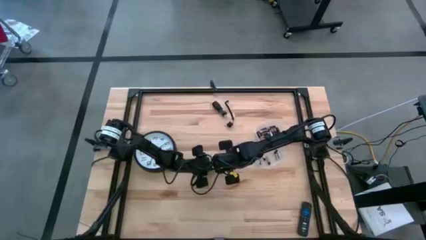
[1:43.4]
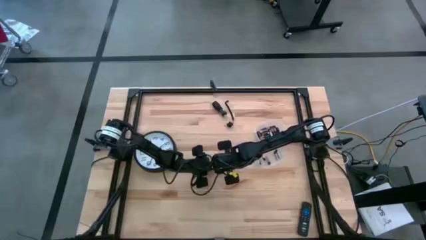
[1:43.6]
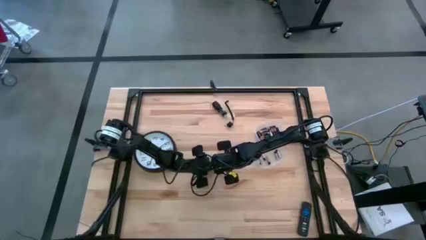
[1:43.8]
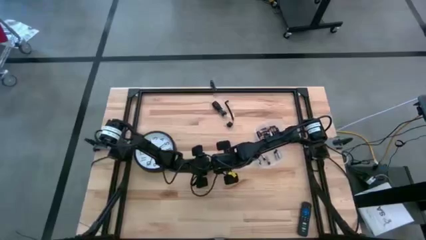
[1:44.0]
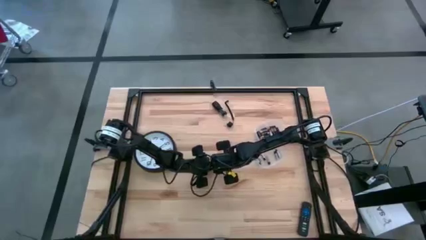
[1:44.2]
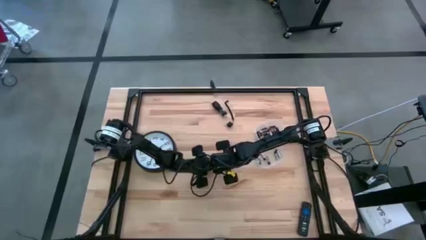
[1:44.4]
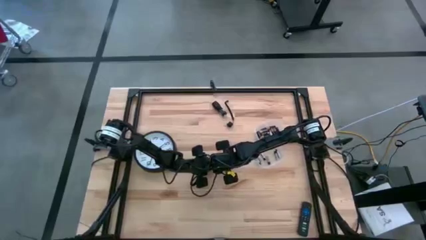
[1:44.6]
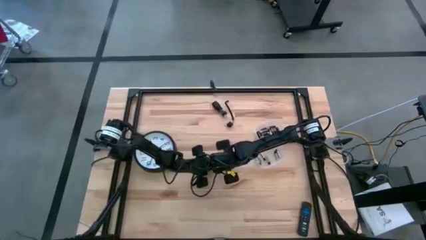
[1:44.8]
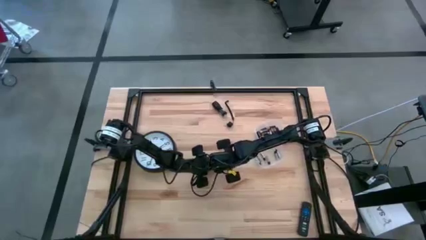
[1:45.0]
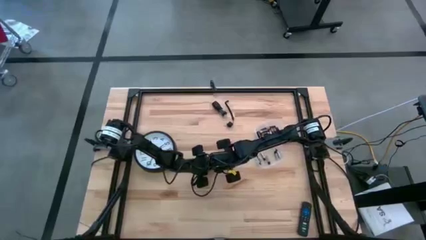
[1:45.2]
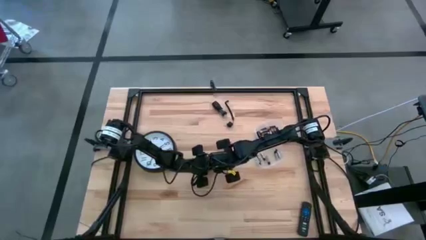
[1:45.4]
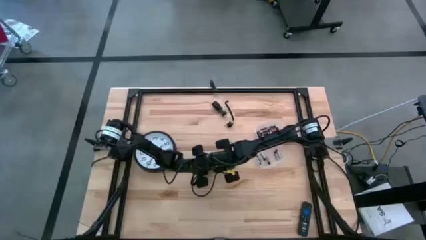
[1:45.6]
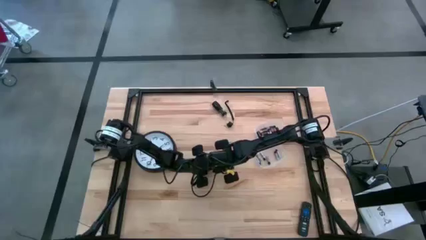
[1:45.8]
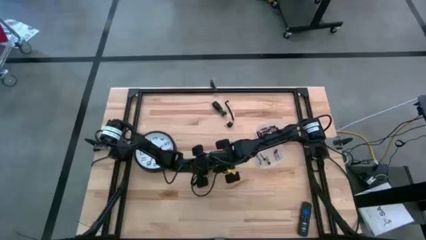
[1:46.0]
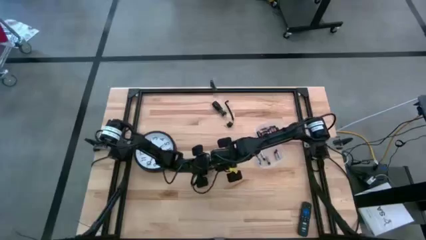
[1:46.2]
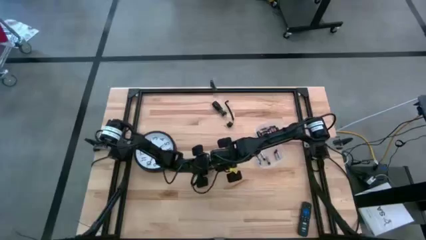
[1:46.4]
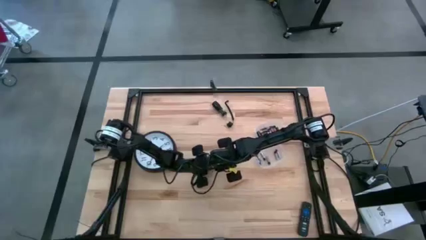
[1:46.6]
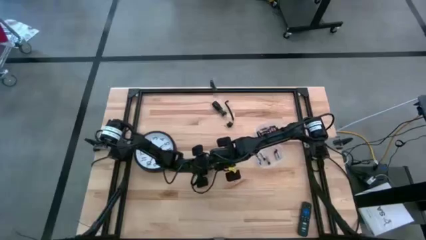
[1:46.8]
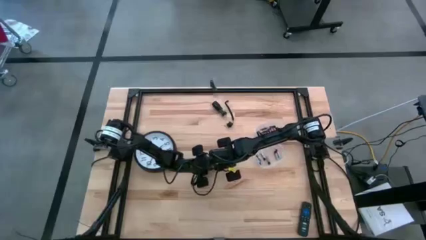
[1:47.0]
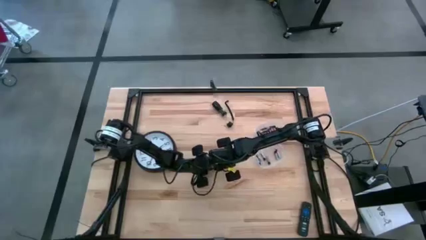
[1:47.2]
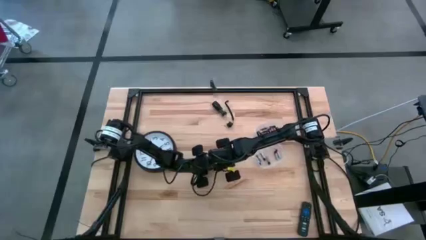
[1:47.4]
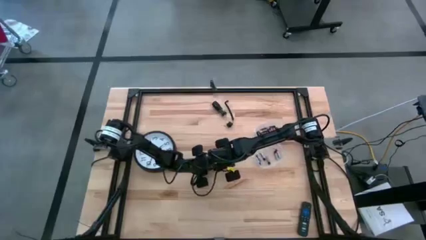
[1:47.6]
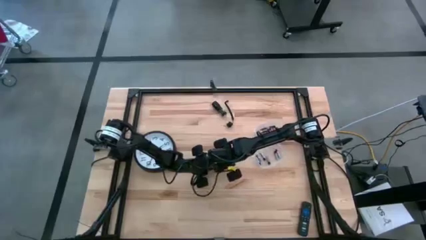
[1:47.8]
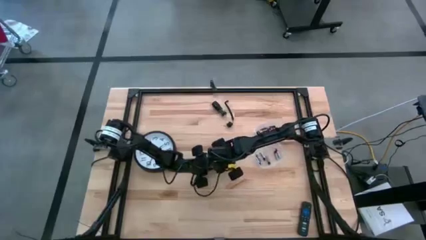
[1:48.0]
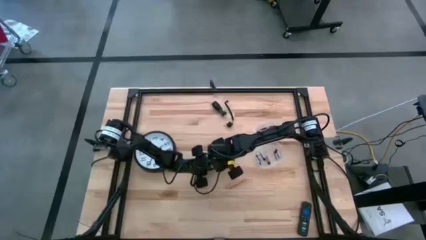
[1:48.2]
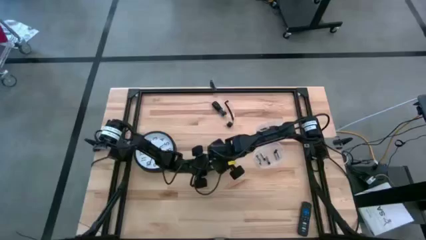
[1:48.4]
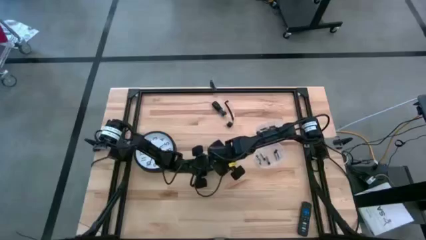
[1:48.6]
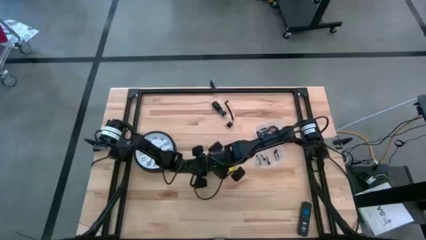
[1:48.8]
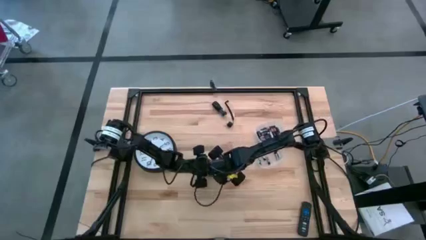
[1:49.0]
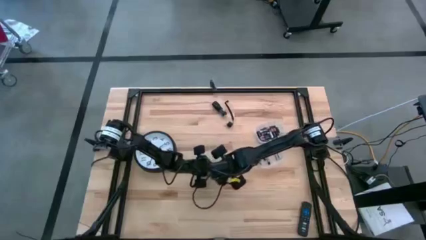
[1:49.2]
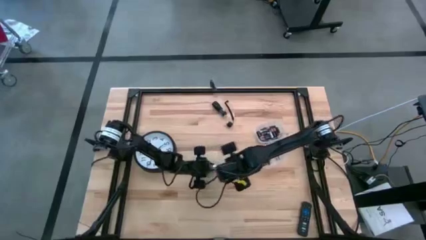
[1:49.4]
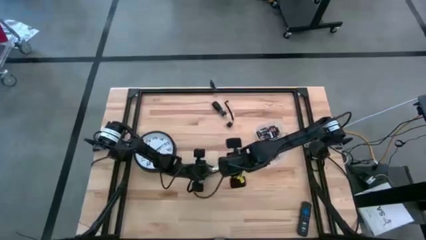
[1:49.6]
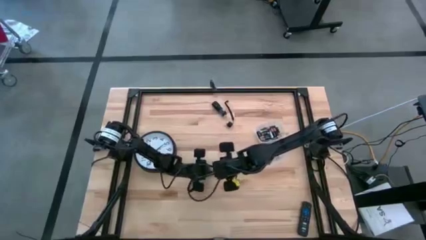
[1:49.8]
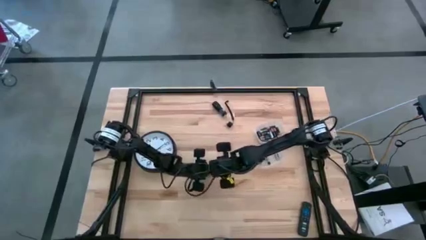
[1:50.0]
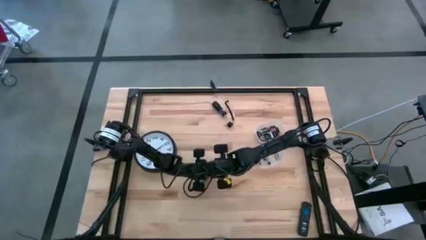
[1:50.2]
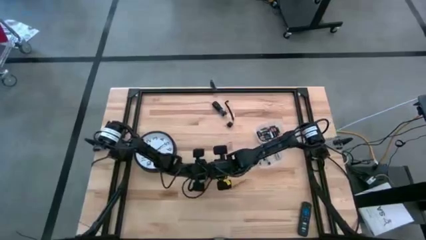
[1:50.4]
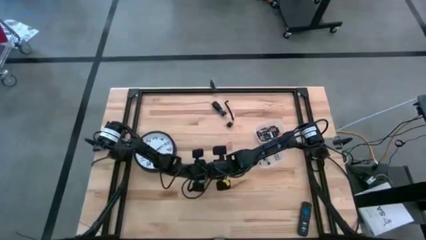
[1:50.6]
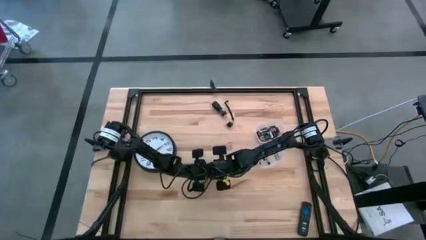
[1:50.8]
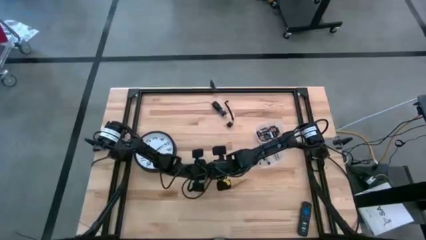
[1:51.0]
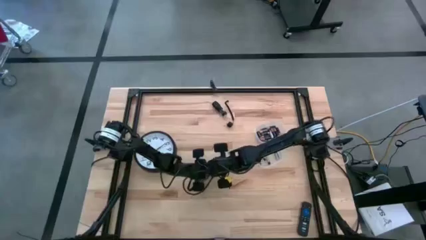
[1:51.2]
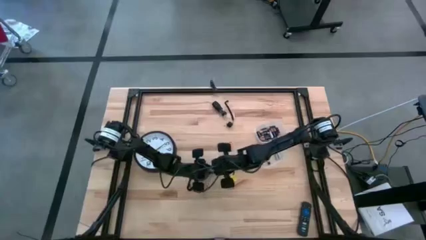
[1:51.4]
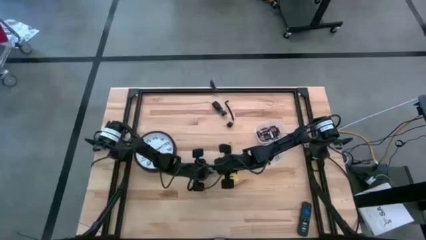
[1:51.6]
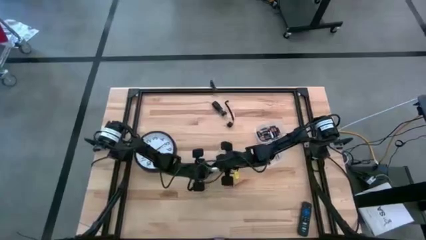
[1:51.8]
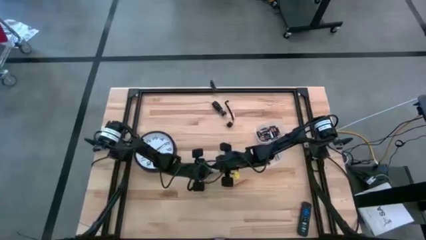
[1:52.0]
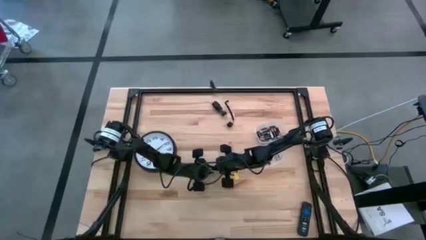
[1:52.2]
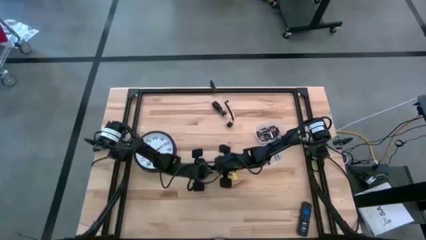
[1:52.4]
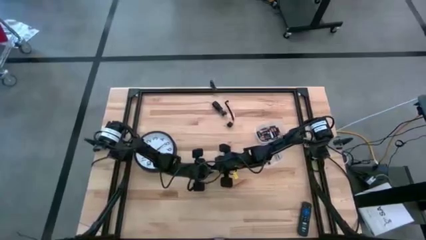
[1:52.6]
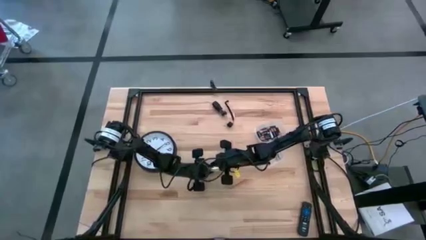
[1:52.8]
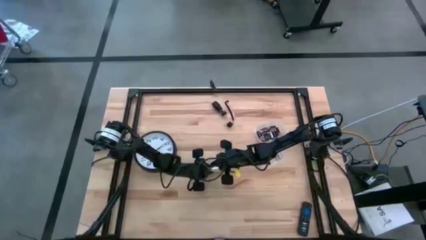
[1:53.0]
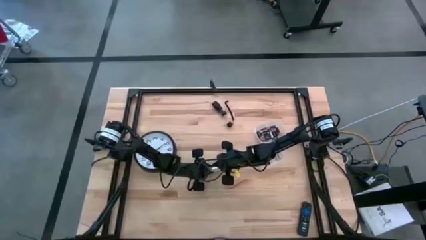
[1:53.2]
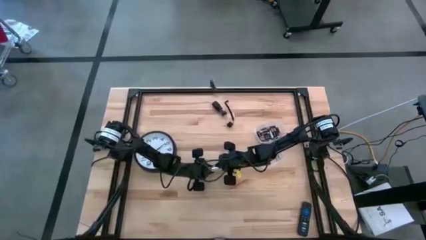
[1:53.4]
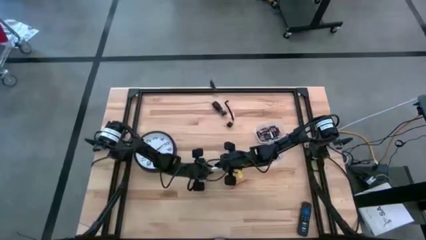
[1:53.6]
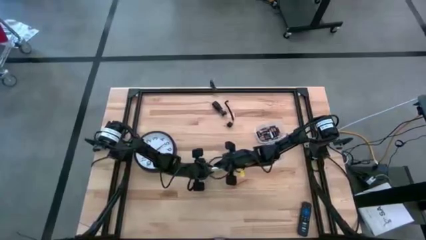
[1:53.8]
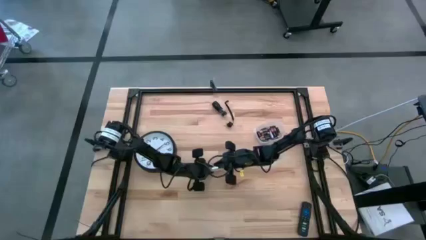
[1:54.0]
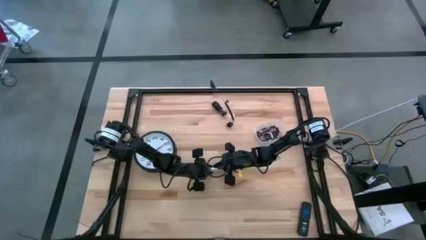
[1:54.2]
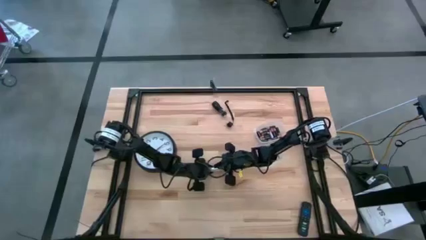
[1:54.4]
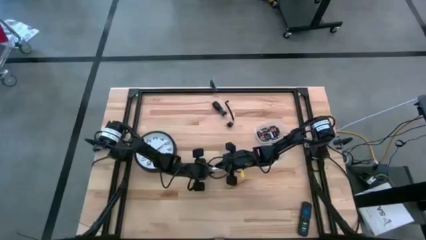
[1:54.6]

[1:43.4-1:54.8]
Task: Insert battery
Insert the silver battery into the white flashlight battery holder

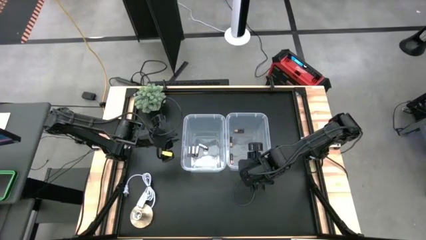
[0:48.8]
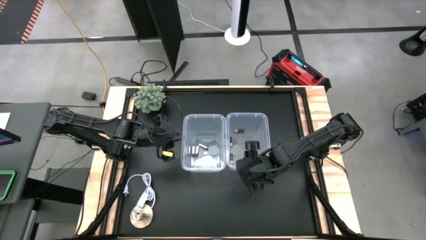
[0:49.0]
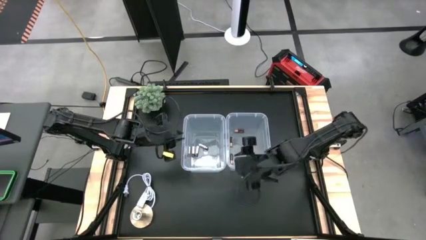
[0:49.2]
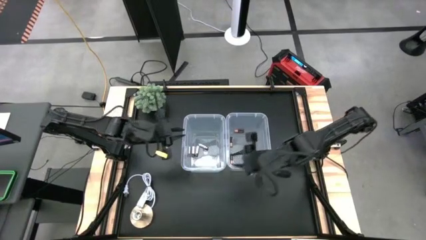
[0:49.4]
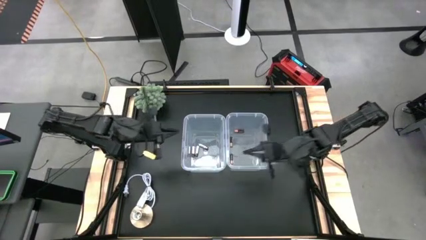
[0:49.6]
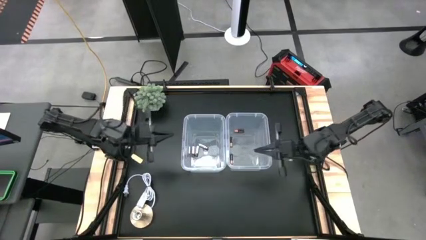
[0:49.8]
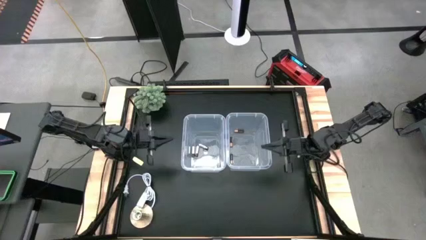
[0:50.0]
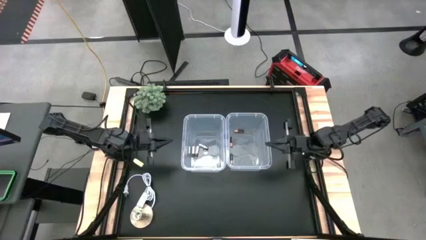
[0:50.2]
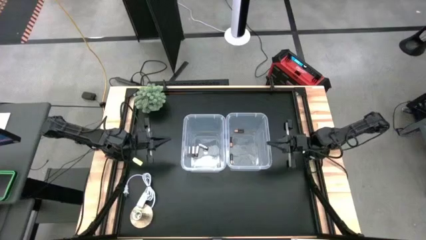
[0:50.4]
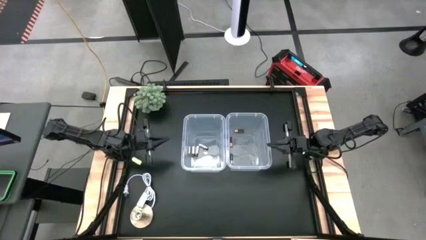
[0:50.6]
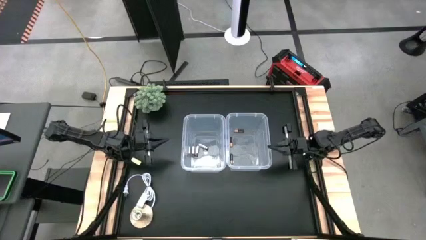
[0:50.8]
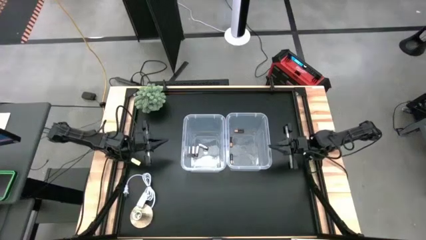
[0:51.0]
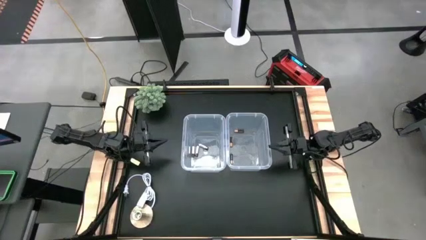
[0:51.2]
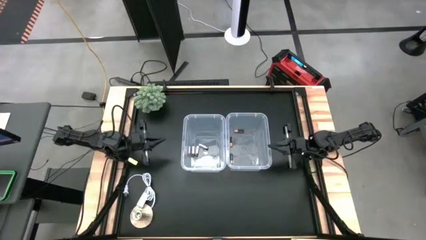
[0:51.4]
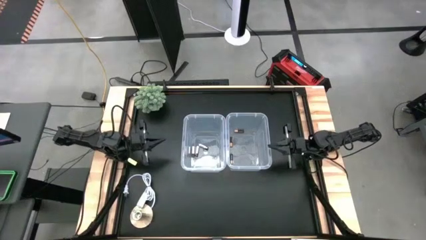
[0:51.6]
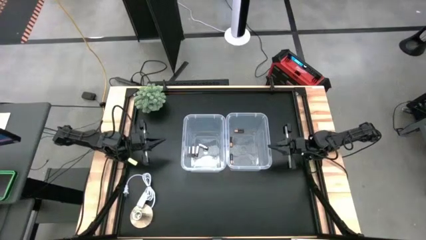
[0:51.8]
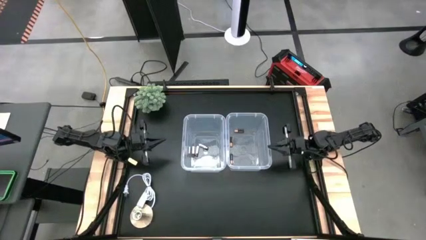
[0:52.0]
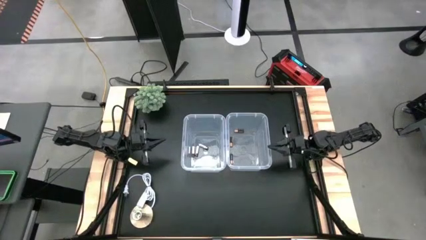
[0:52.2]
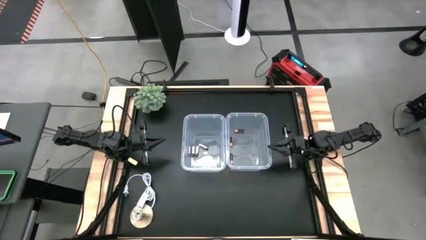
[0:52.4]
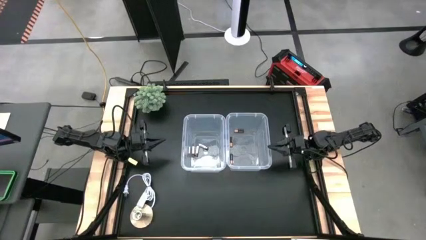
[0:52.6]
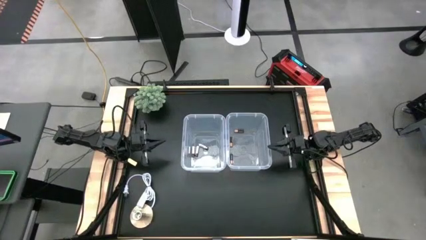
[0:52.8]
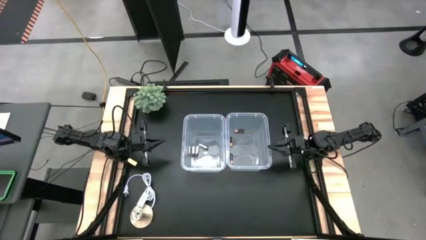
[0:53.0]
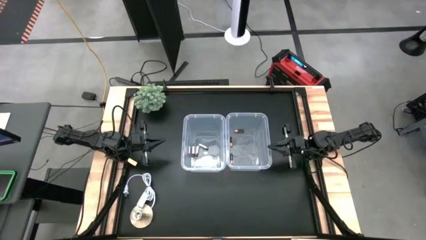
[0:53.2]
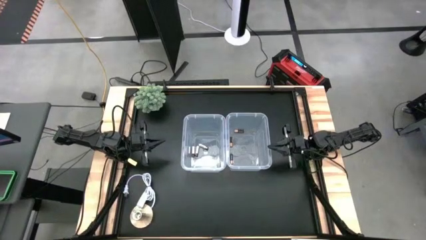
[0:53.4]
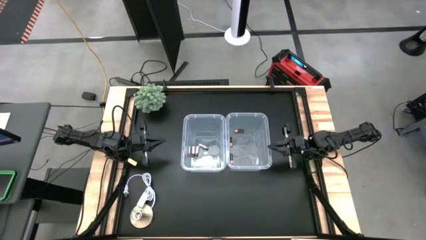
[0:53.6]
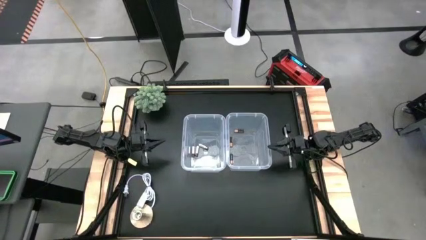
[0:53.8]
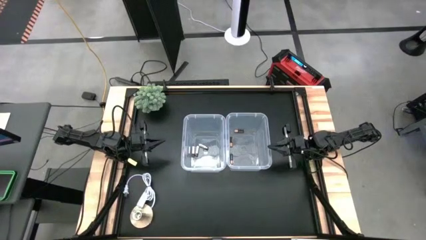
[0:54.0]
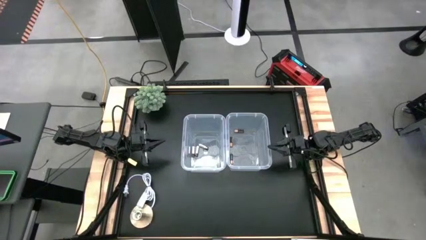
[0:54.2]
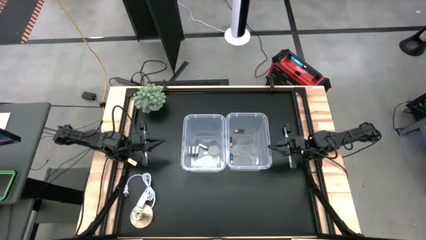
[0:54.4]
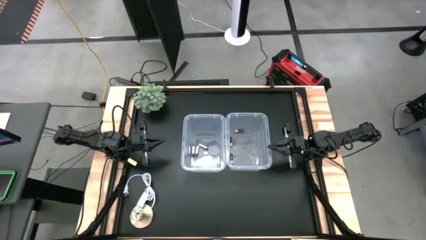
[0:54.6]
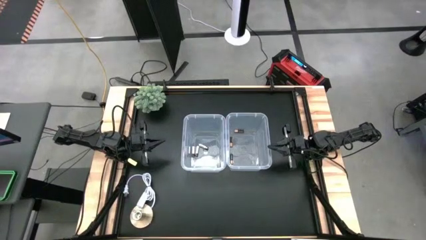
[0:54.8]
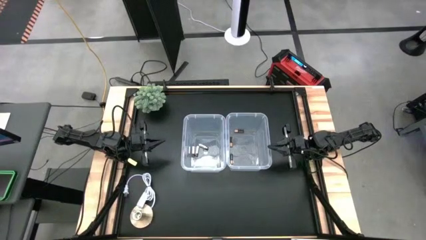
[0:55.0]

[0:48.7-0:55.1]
Task: Sort batteries
Return to Home Position
